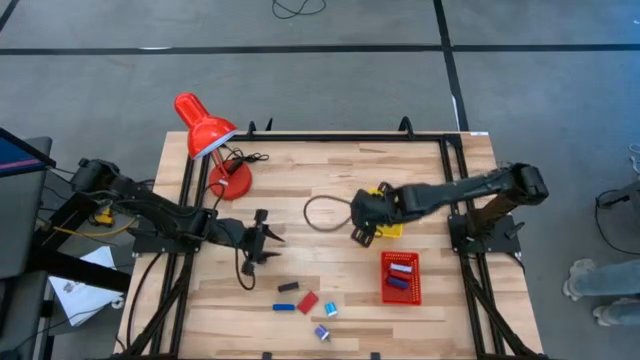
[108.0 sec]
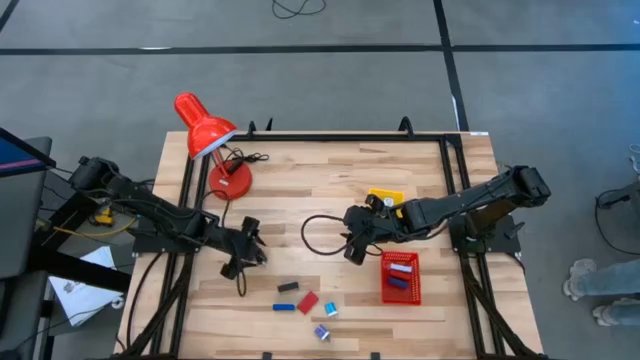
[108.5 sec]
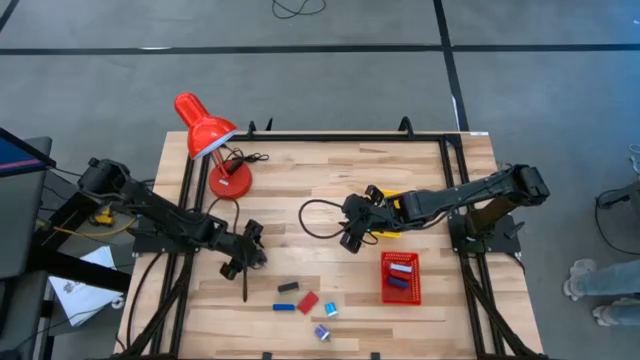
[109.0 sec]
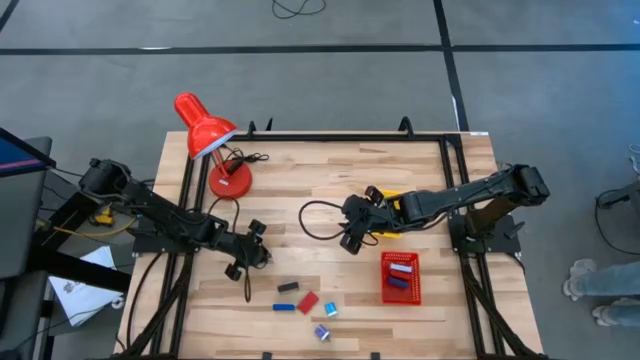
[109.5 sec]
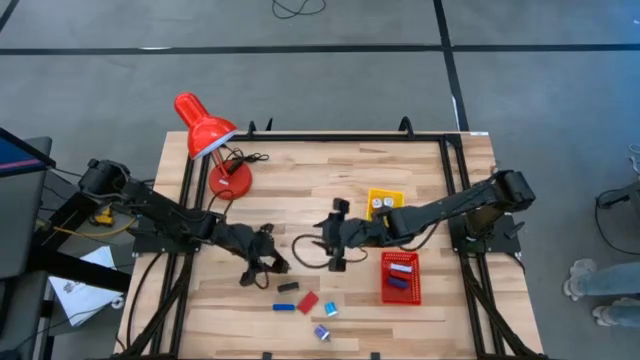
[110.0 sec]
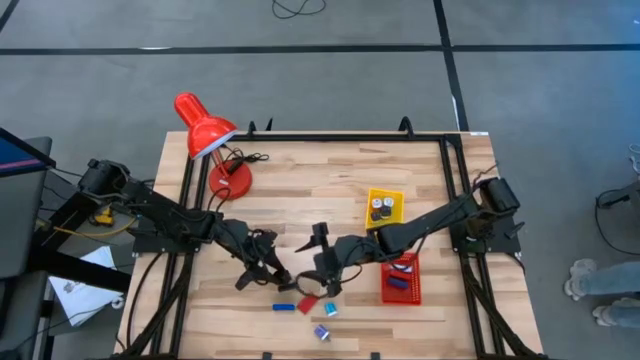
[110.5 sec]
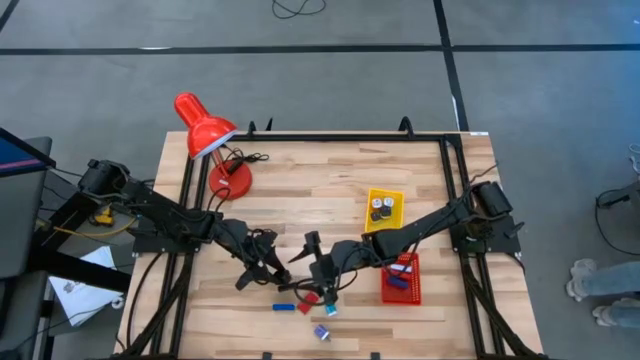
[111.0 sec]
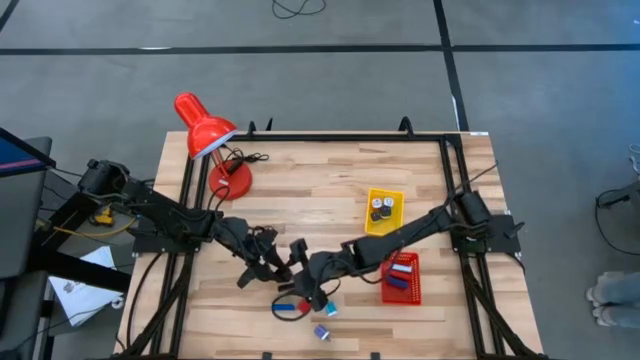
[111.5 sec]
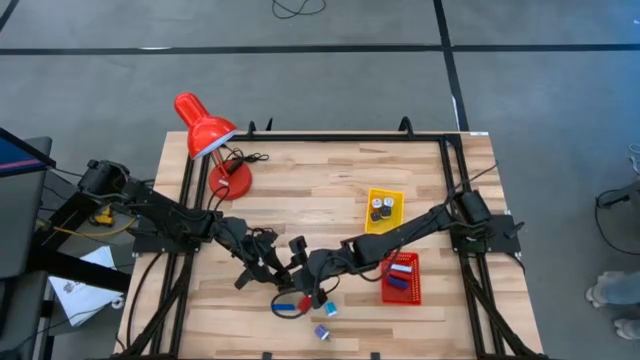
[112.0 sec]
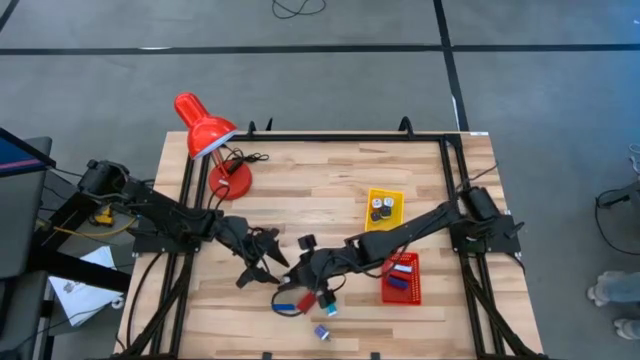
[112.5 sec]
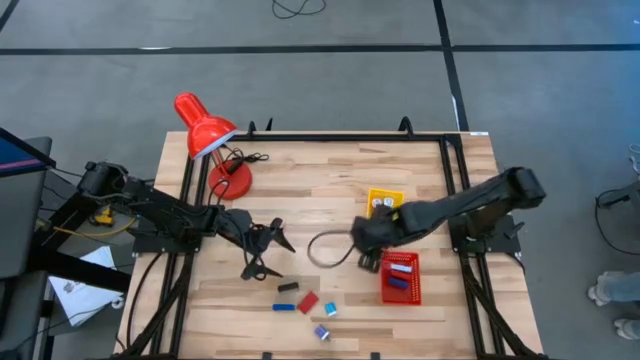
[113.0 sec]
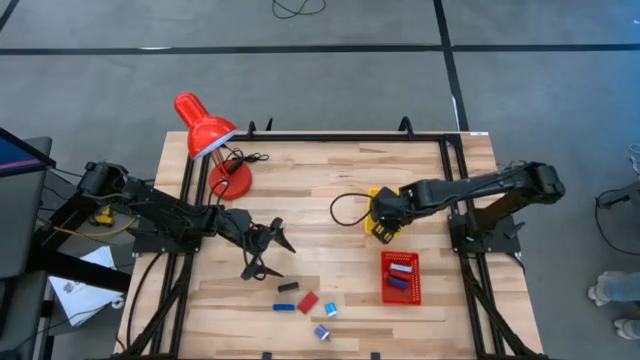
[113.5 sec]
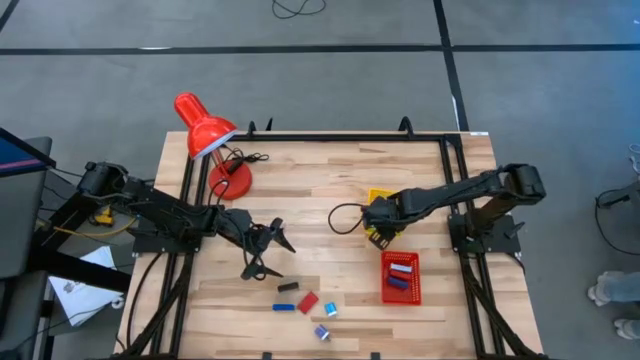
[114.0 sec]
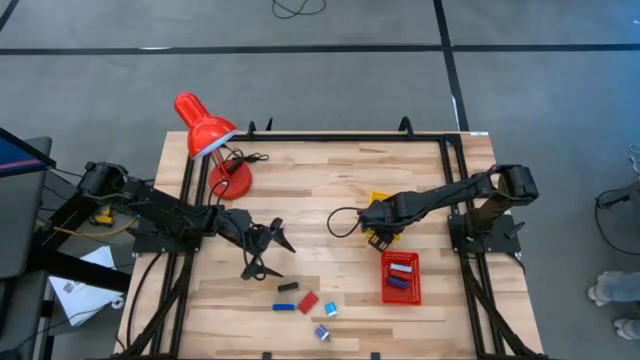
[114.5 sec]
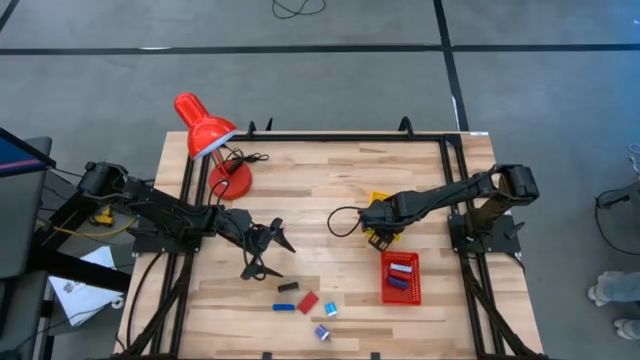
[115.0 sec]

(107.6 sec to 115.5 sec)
Task: Pick & Place Office items
Put the black charger adapter into the yellow bin

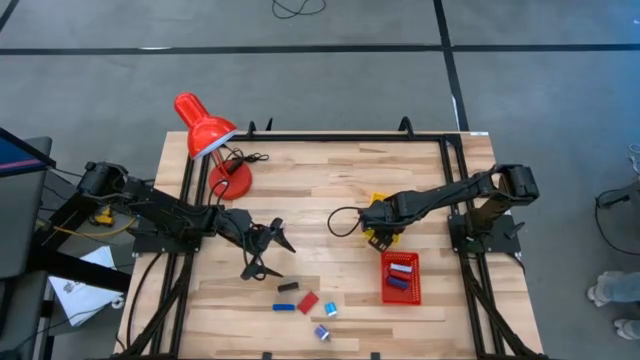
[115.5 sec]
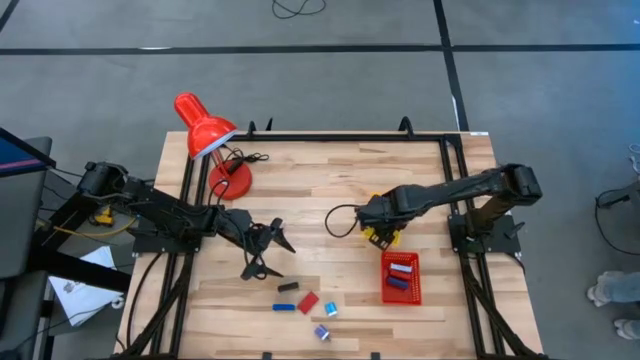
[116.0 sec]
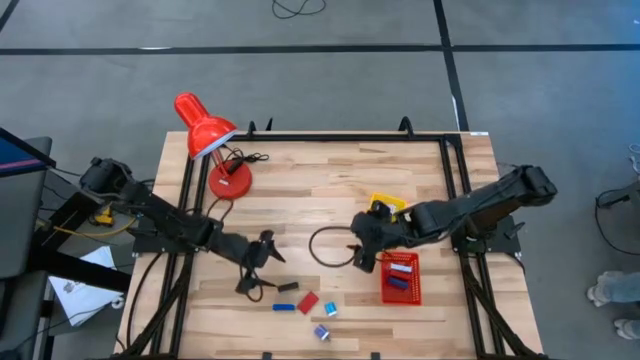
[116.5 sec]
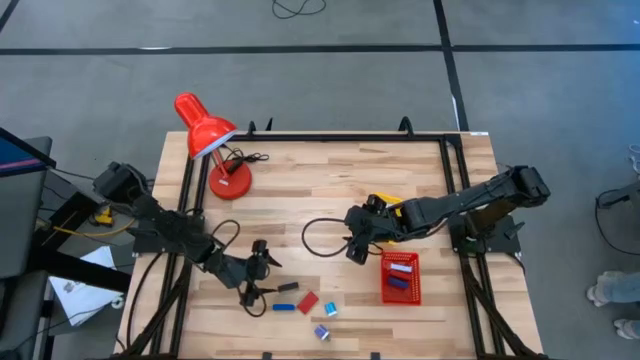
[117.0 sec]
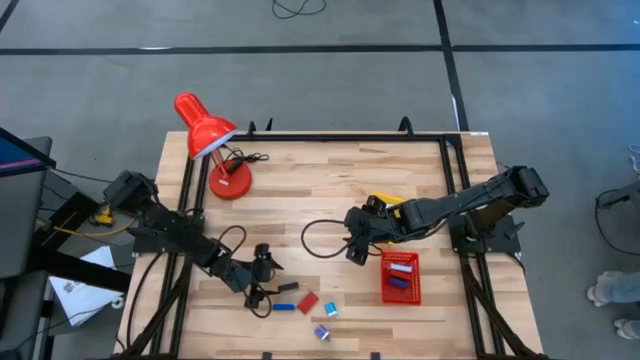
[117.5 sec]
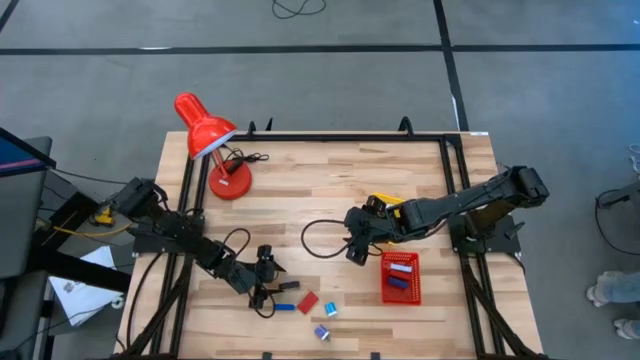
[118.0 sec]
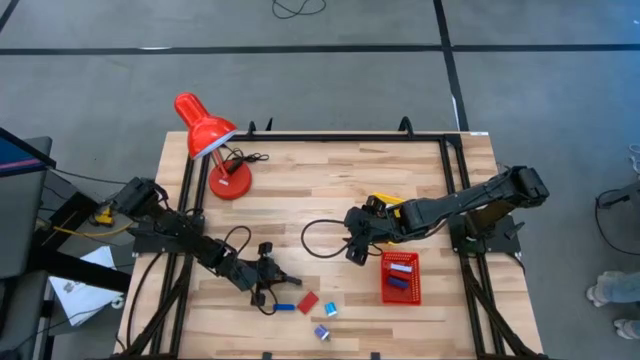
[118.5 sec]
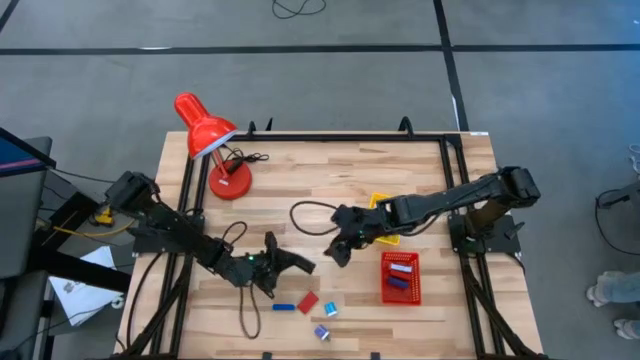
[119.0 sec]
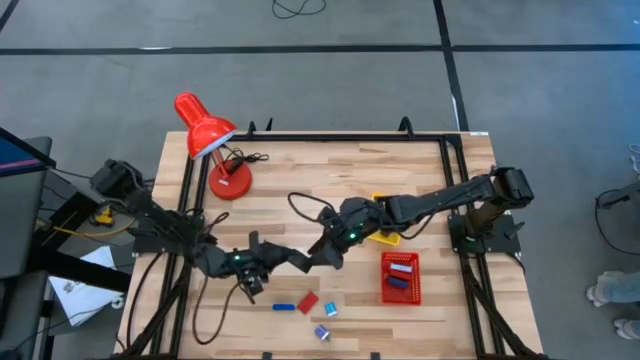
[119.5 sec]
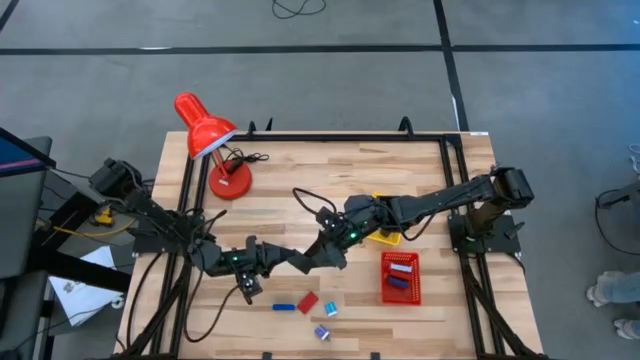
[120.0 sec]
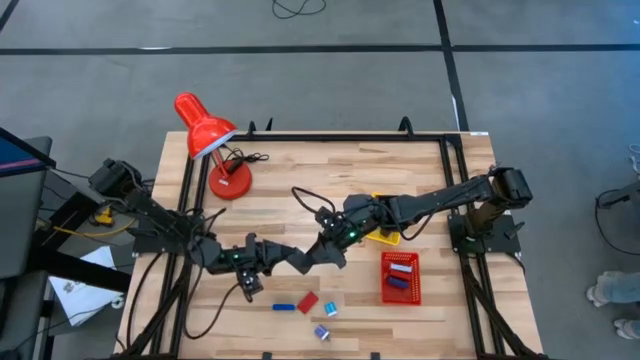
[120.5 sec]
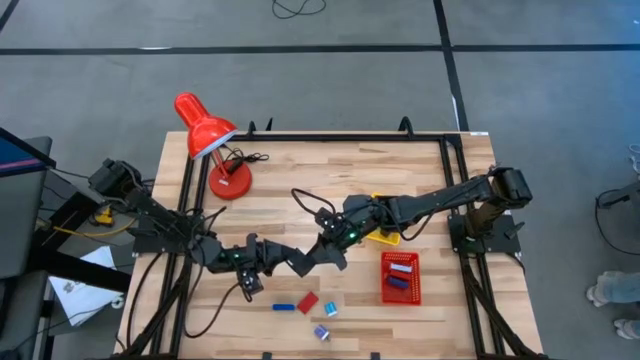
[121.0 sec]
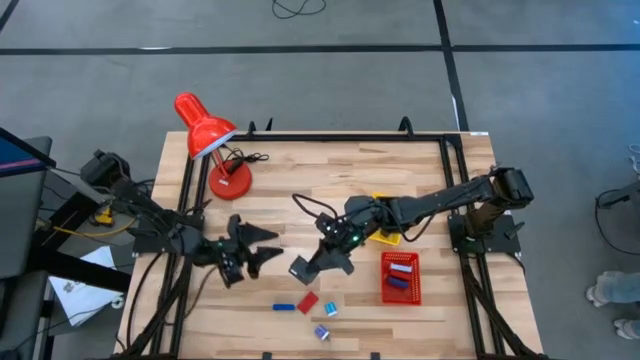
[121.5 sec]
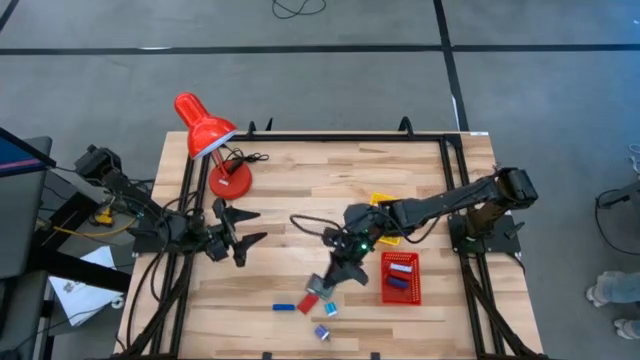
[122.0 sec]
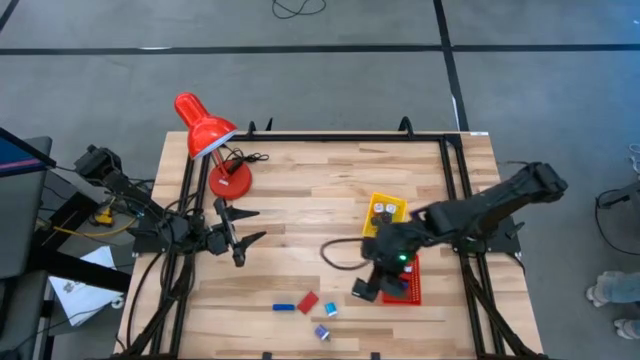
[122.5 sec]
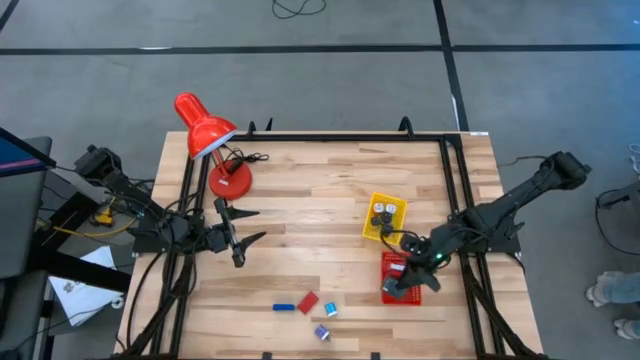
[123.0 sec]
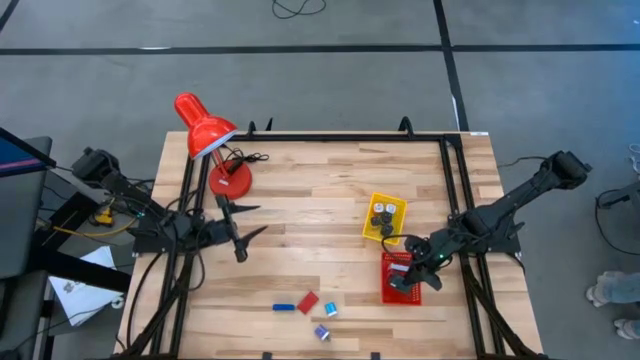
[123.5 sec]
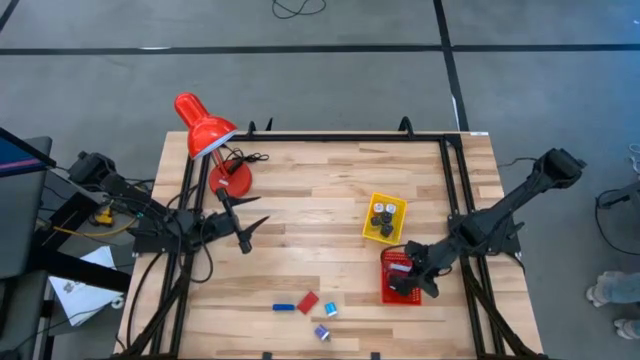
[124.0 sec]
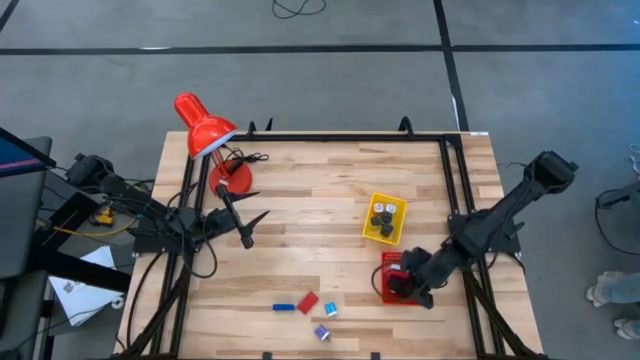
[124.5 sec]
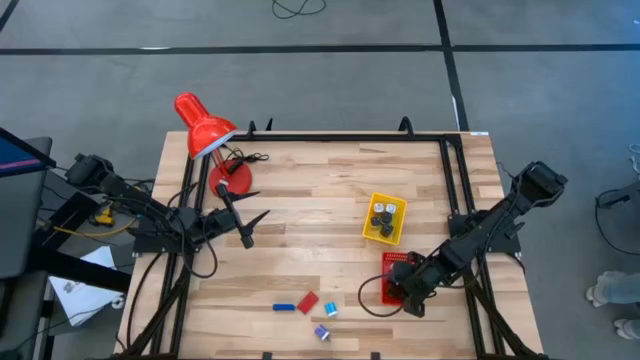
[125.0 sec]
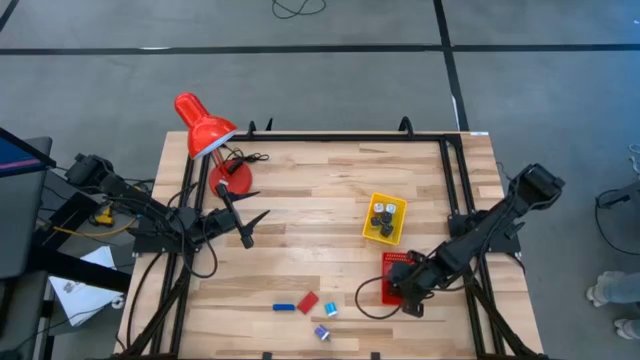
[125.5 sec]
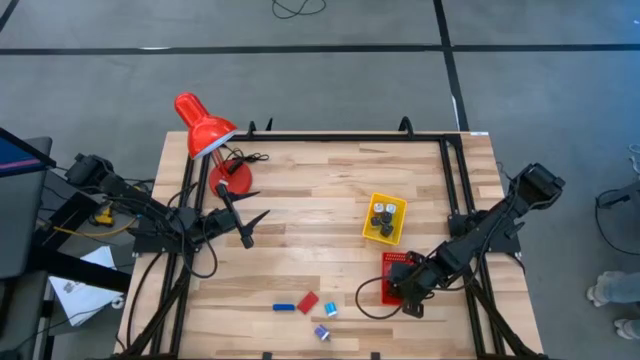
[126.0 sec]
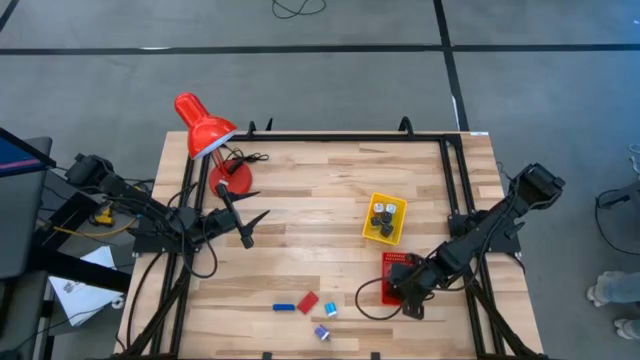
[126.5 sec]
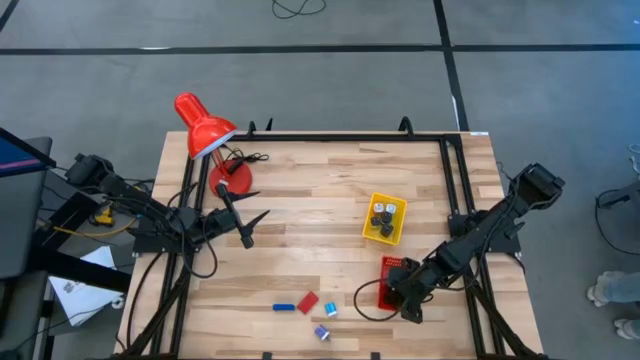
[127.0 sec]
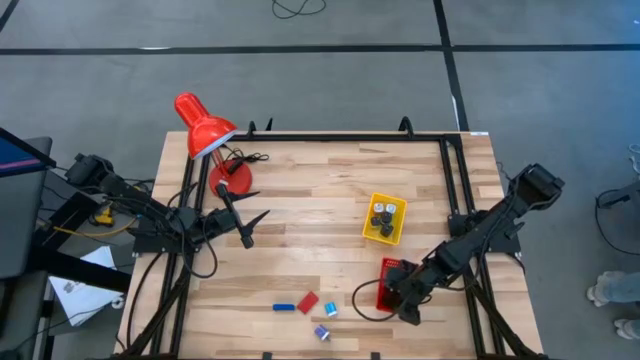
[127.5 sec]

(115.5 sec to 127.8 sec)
Put the black digital timer into the red bin

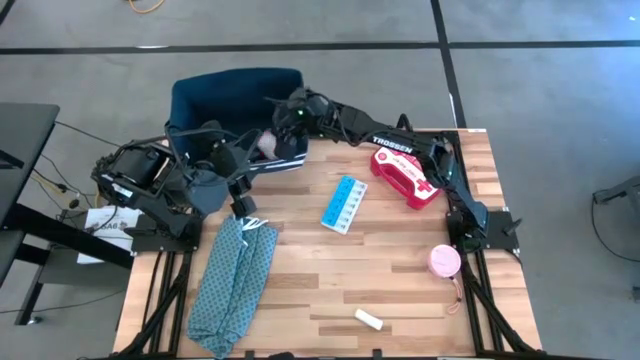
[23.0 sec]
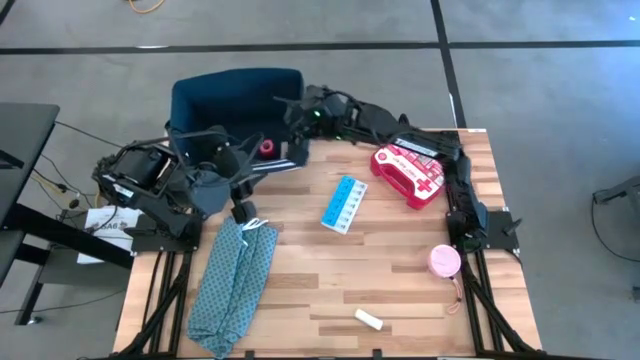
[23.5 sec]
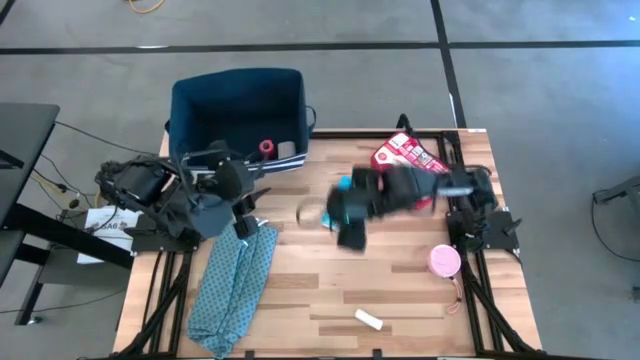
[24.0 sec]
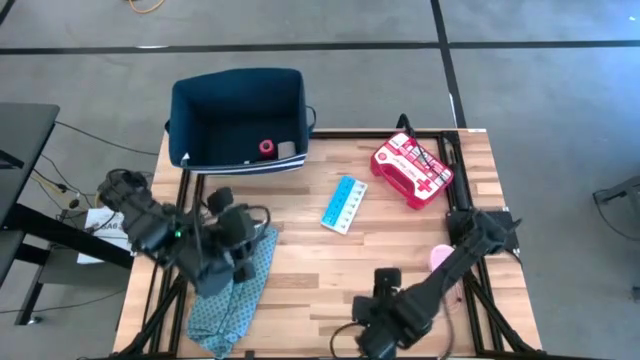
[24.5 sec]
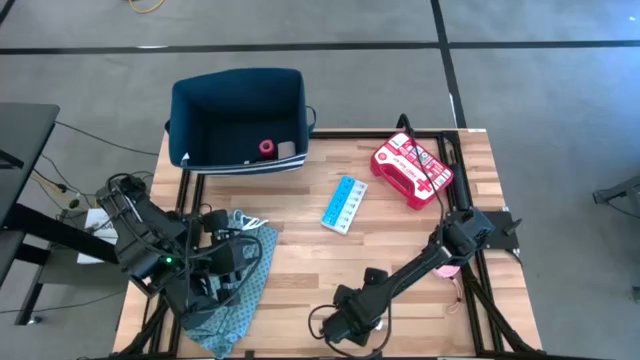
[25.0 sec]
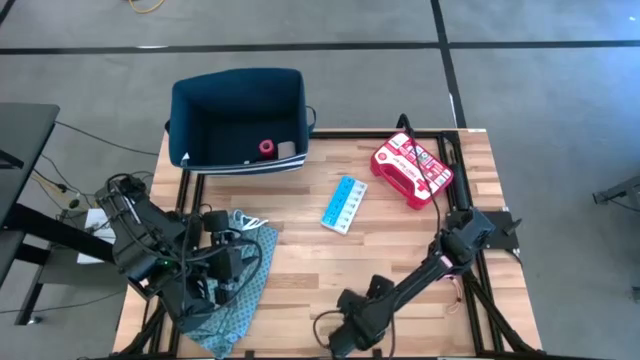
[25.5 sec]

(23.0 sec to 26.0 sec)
Task: Pick & place medical supplies in basket/bin
Put the white rolled gauze into the blue bin
